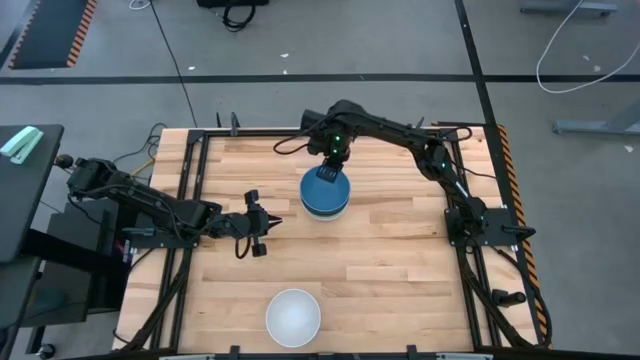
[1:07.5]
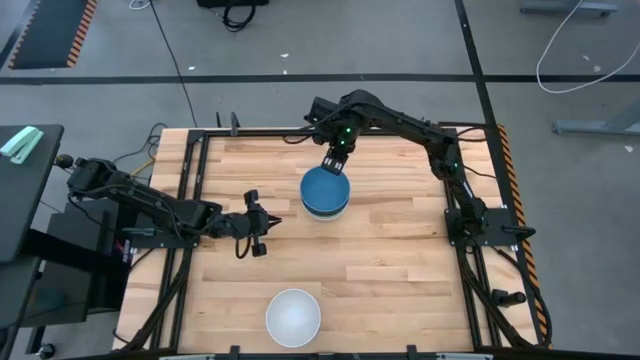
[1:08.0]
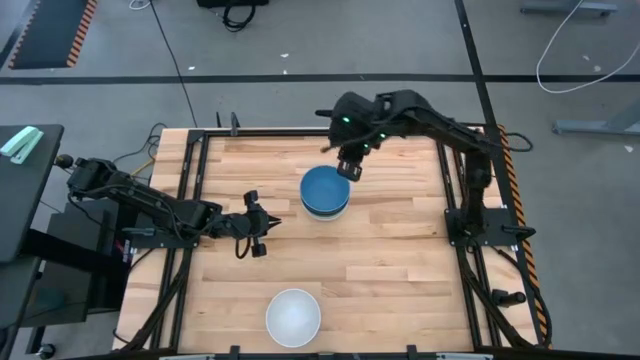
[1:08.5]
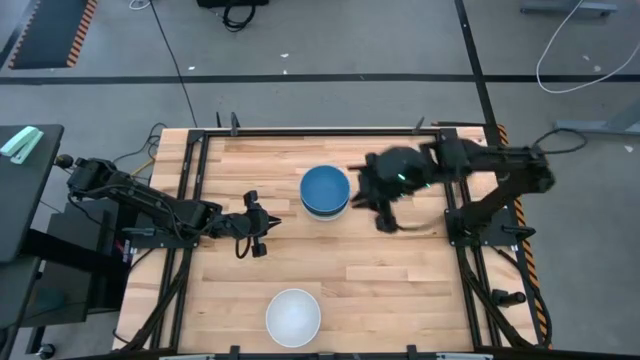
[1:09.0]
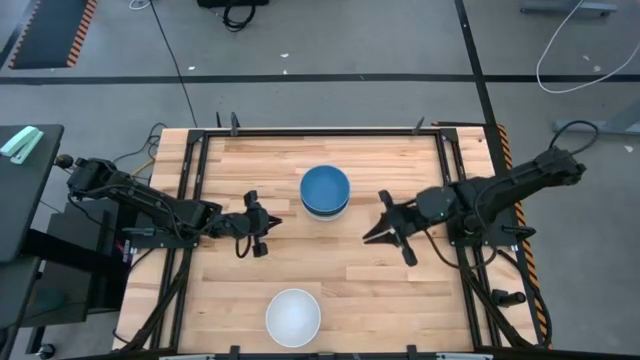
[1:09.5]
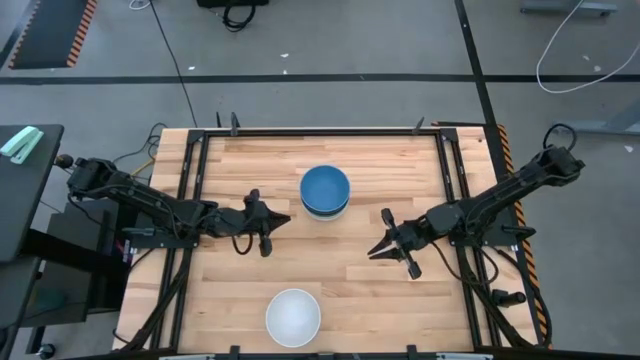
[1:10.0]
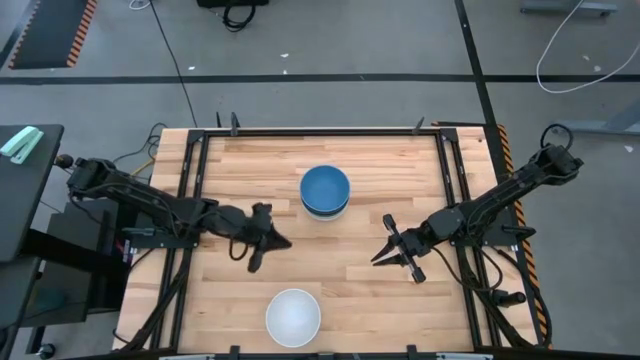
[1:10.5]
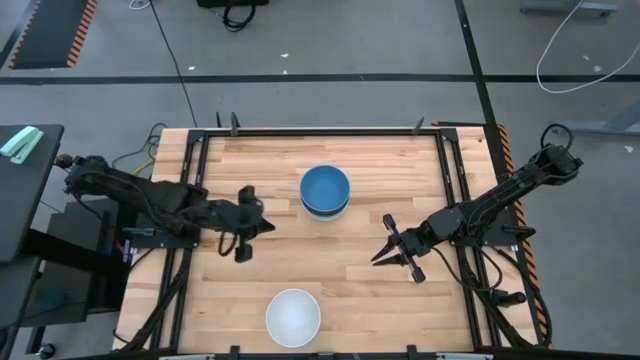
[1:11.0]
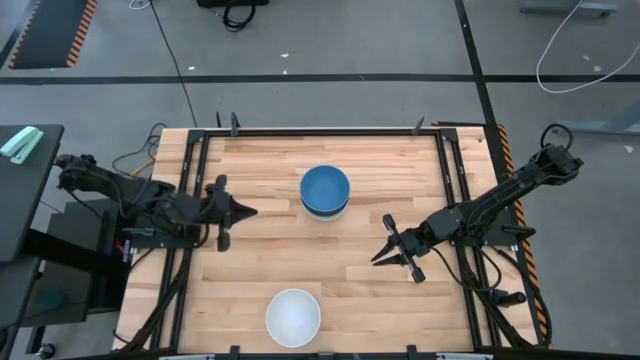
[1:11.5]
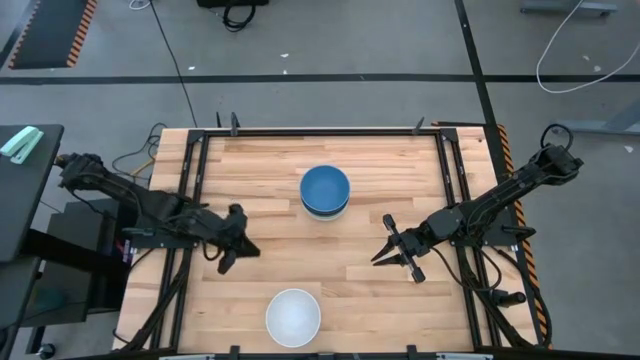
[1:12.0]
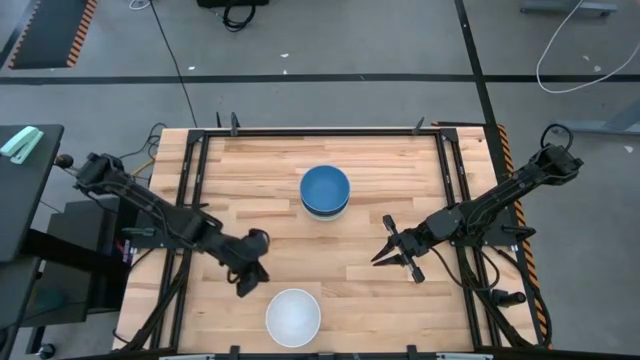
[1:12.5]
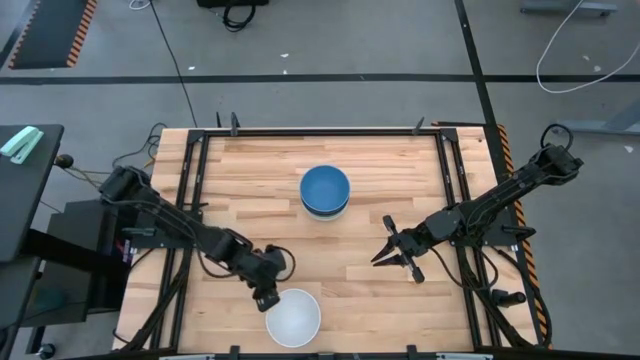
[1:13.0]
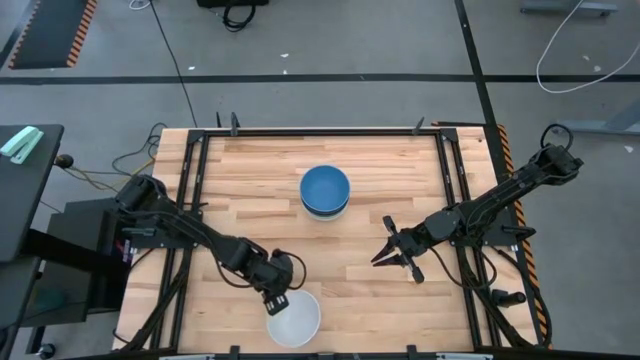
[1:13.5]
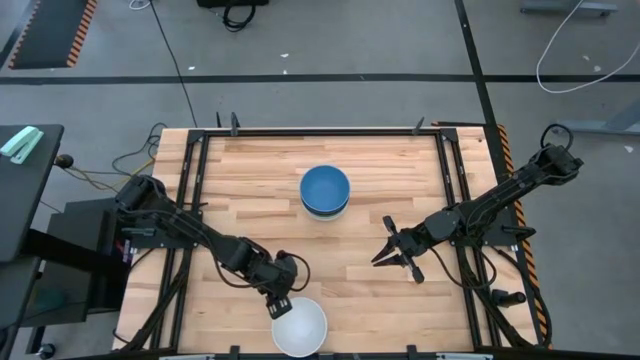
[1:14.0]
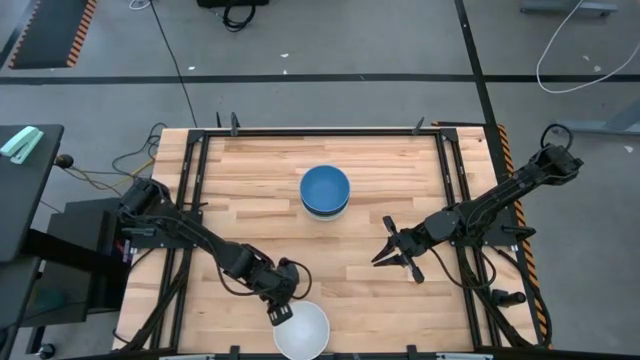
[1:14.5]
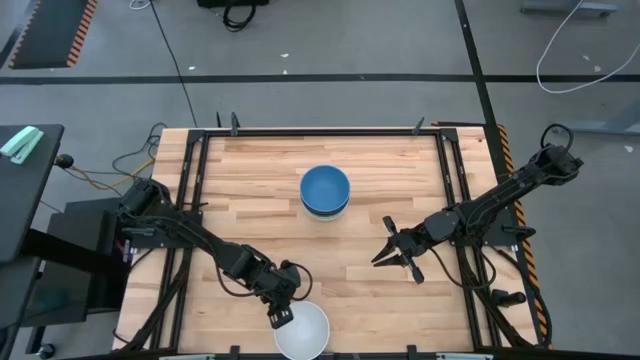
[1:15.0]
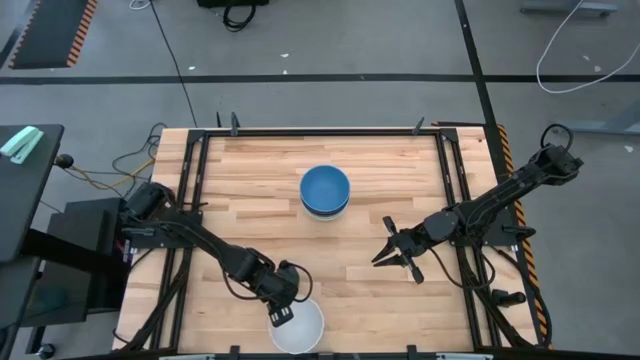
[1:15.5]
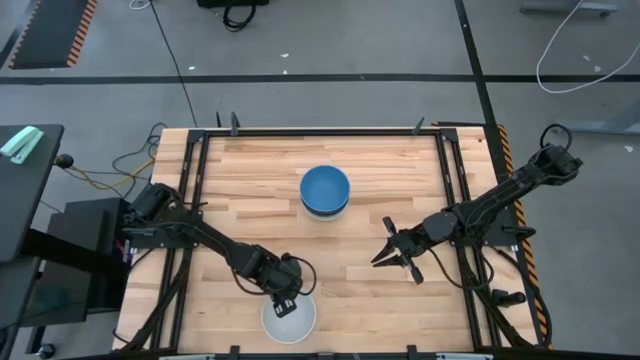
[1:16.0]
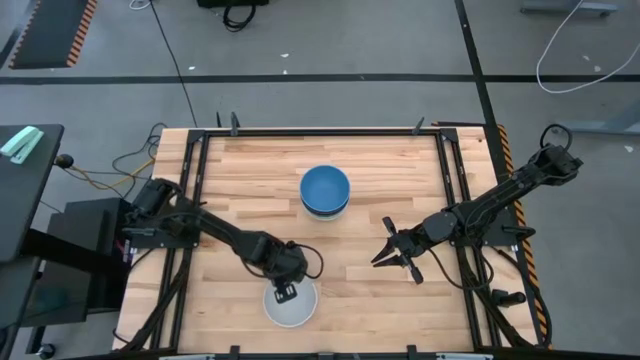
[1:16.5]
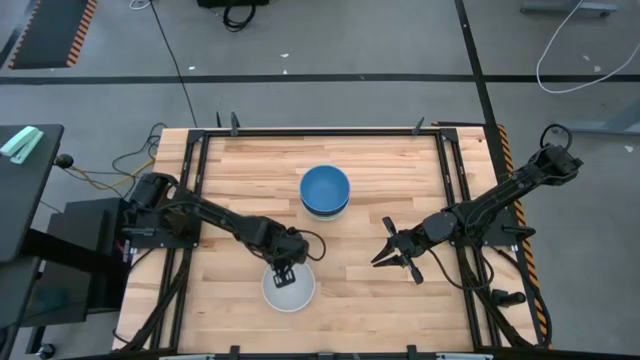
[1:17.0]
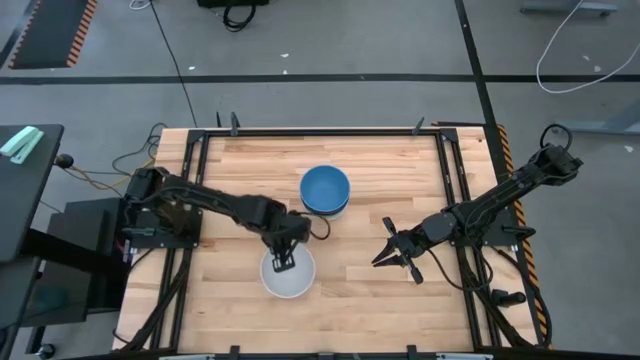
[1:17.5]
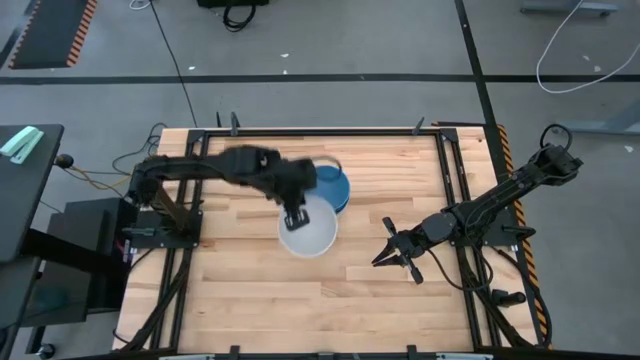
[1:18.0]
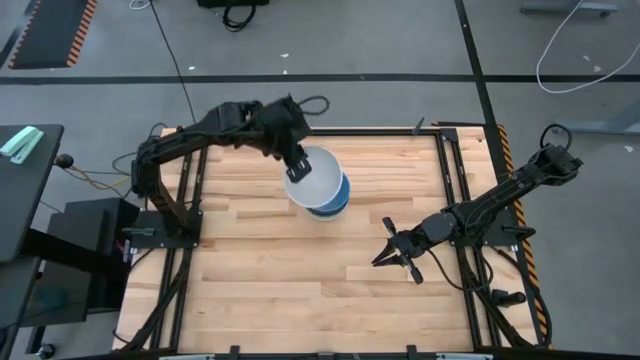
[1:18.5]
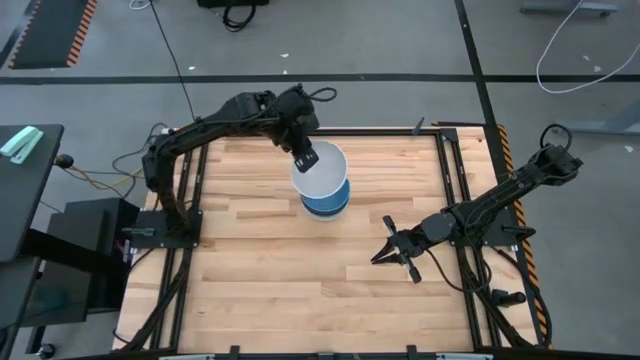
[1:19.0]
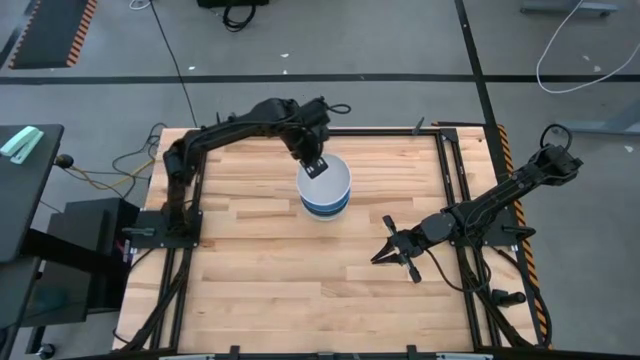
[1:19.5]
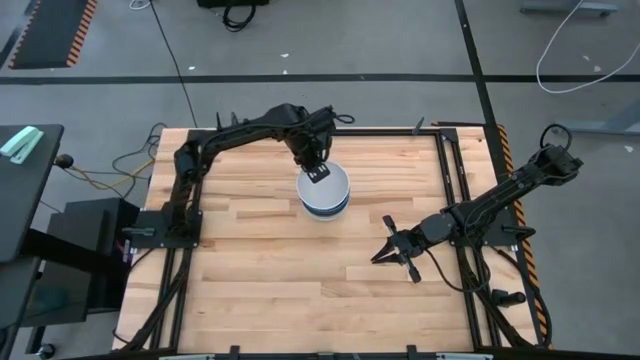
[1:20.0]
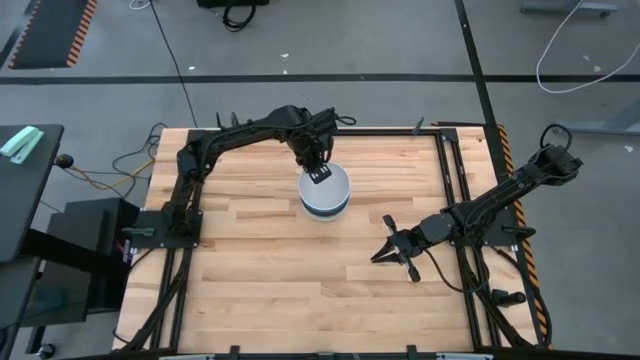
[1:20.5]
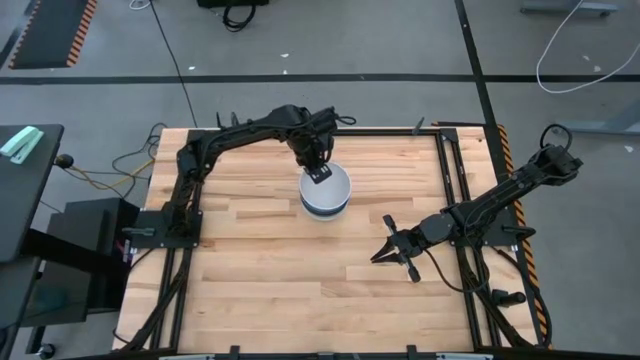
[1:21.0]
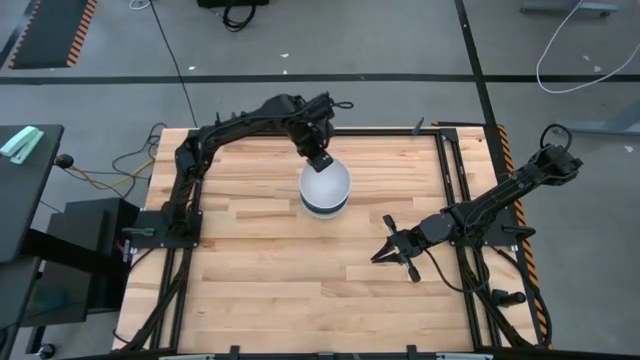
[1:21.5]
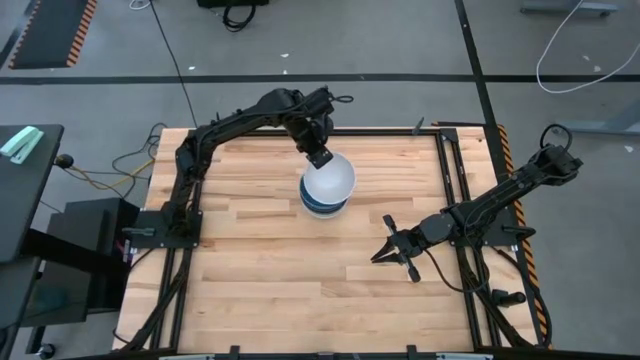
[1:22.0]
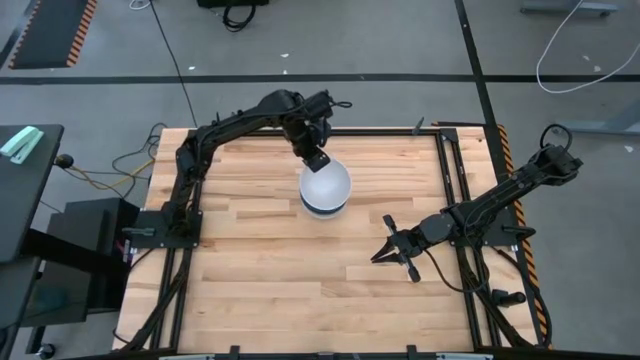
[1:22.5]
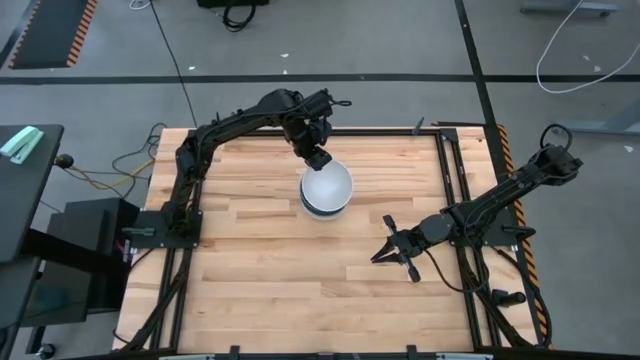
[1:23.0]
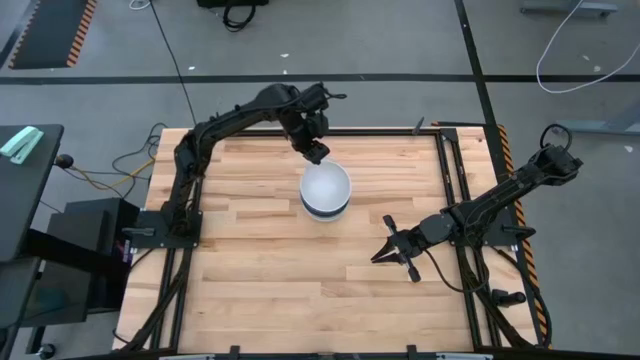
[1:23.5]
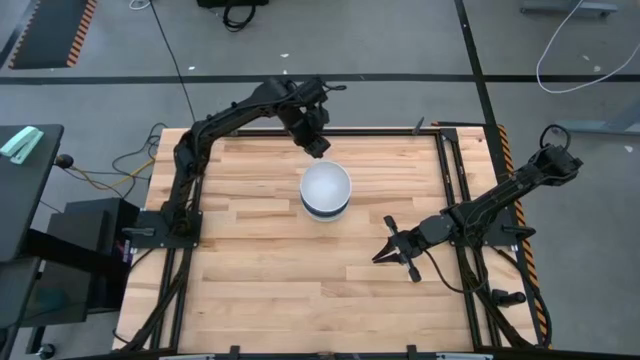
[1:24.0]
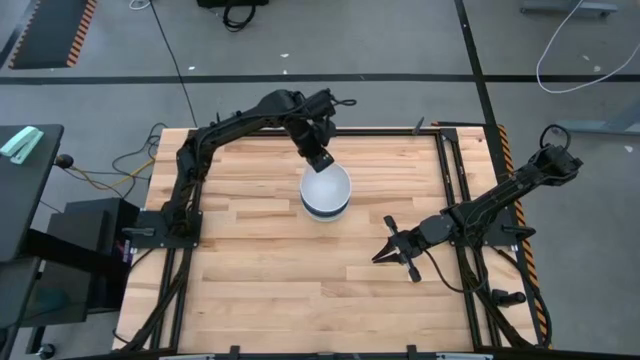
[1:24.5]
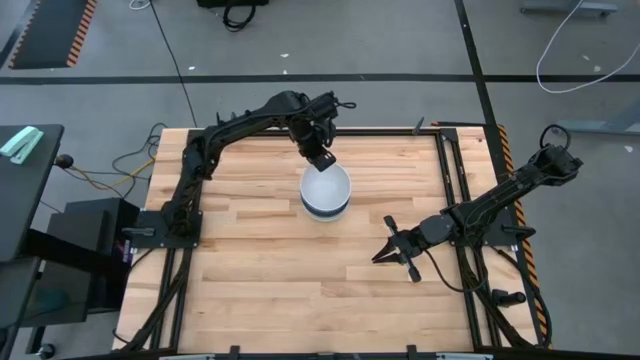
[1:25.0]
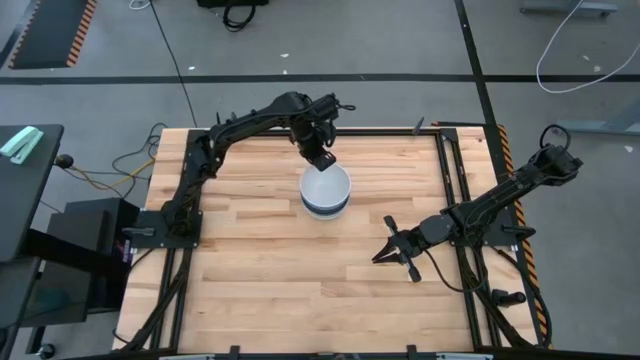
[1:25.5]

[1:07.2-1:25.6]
Task: Nest bowls inside each other
Stack the white bowl on top of the blue bowl

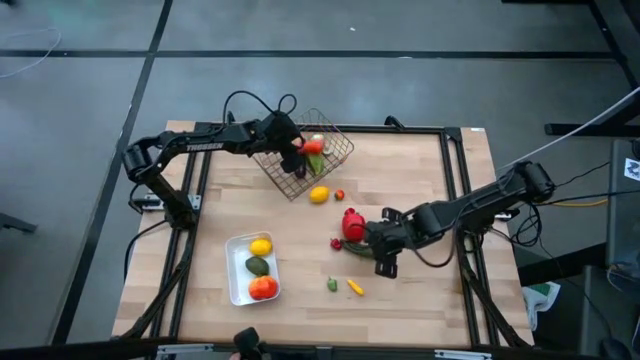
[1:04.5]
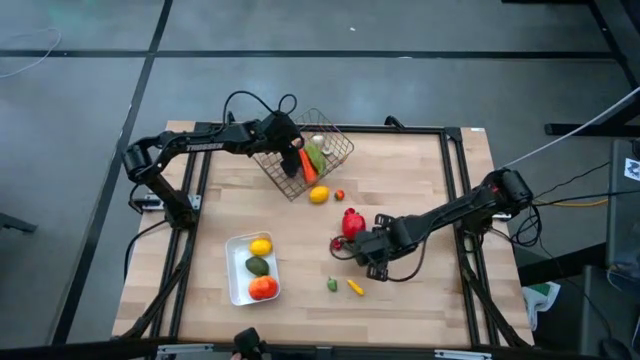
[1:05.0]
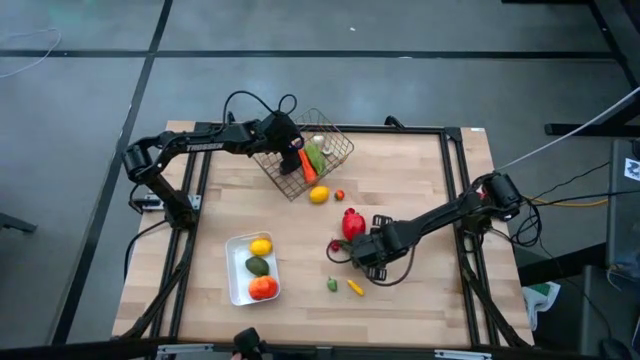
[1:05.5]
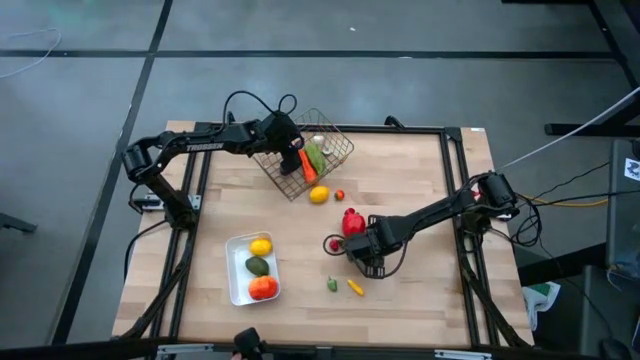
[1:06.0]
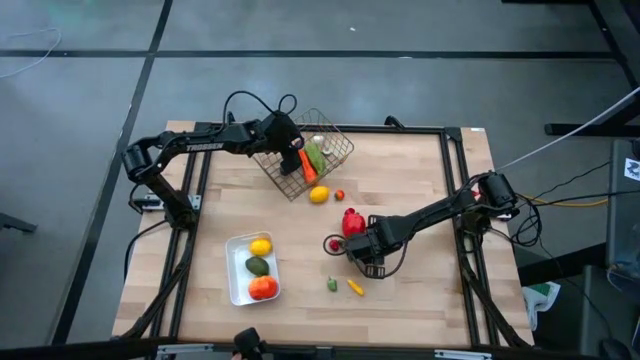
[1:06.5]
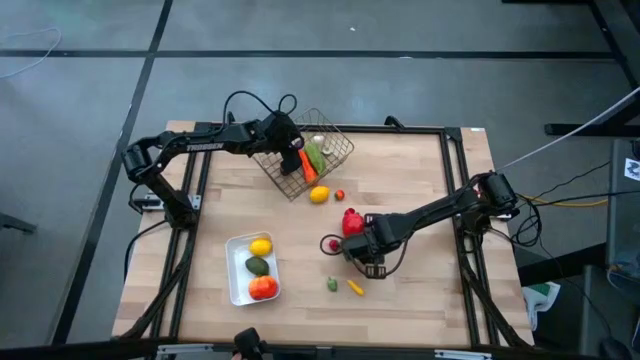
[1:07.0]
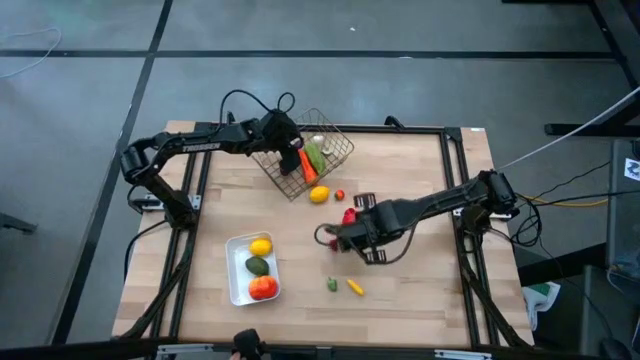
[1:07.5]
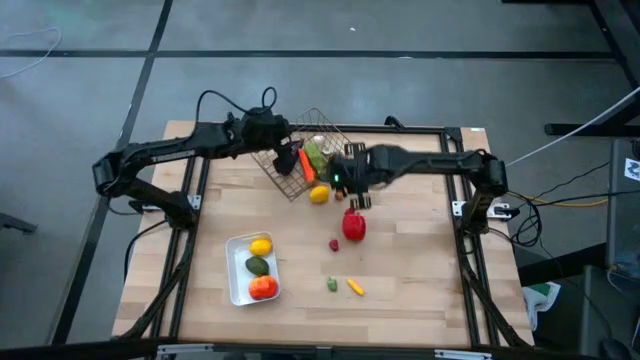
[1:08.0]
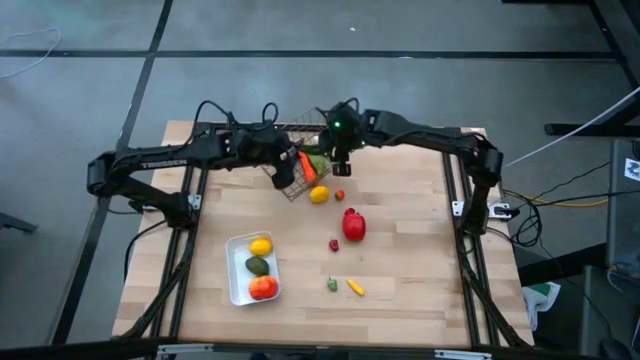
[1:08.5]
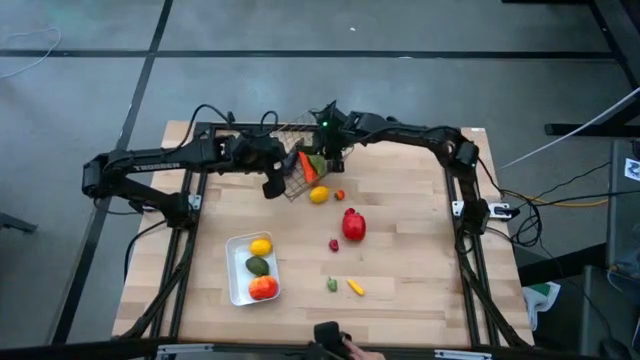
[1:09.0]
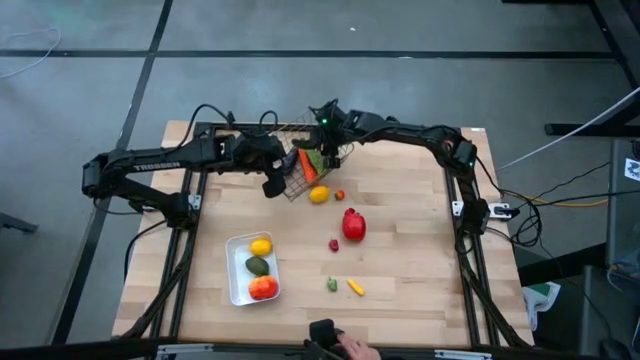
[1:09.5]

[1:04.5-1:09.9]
Task: Sort produce into baskets
Put the green chili pepper into the gold wire basket
